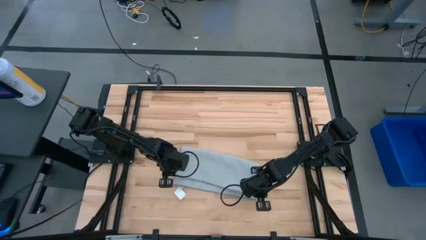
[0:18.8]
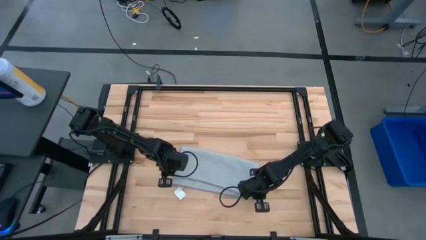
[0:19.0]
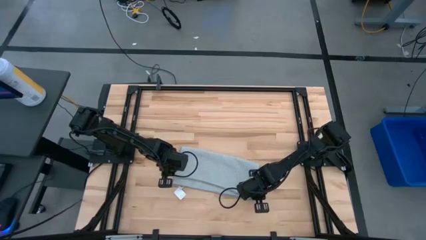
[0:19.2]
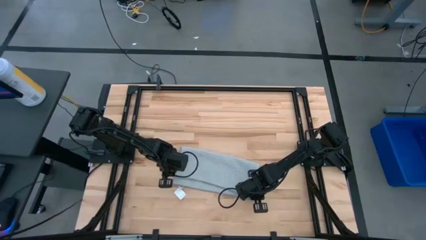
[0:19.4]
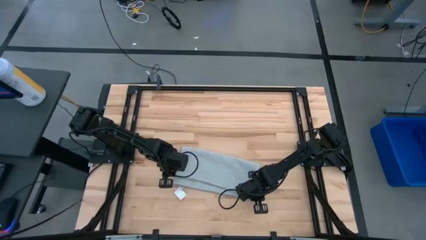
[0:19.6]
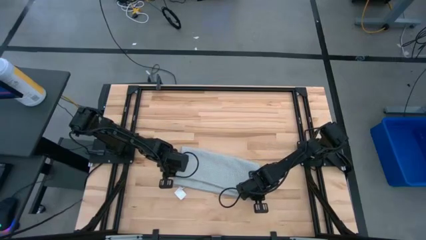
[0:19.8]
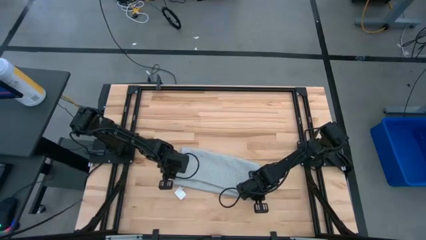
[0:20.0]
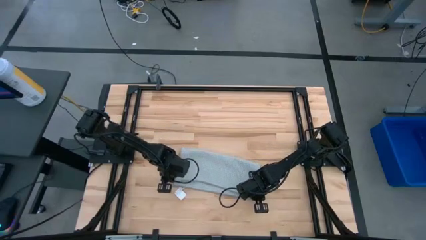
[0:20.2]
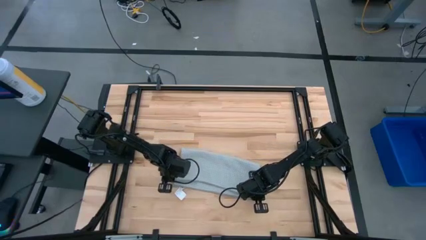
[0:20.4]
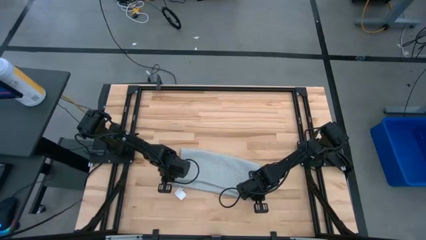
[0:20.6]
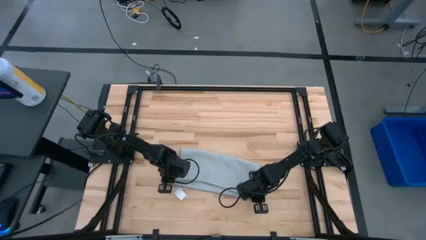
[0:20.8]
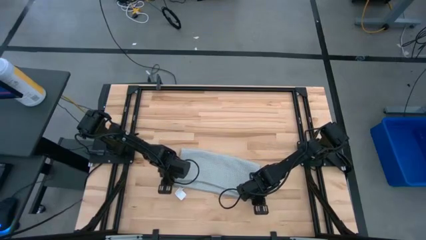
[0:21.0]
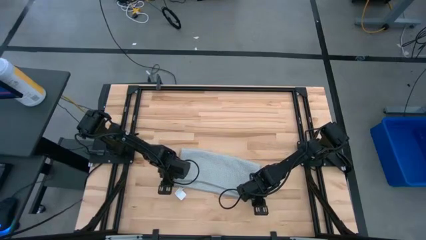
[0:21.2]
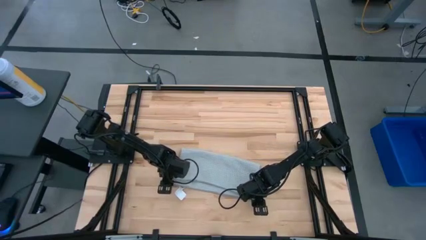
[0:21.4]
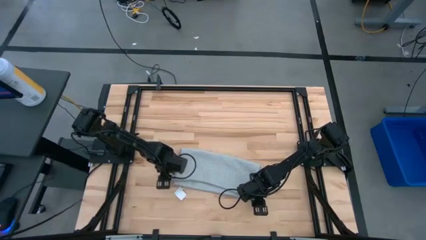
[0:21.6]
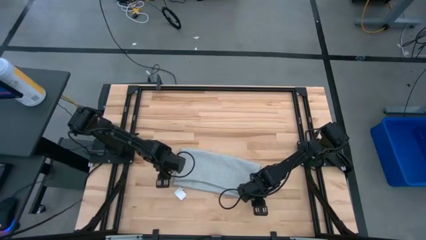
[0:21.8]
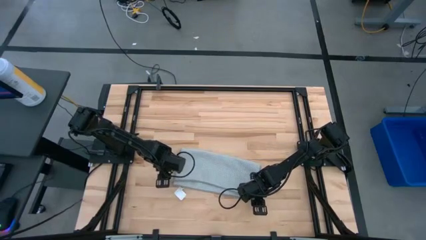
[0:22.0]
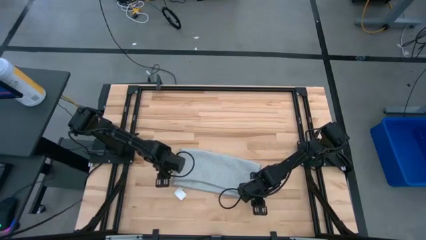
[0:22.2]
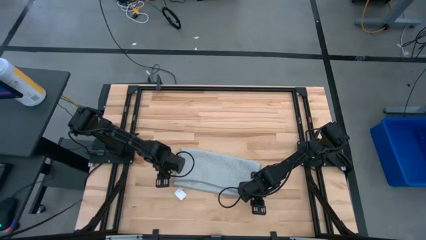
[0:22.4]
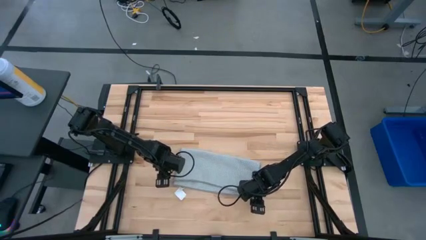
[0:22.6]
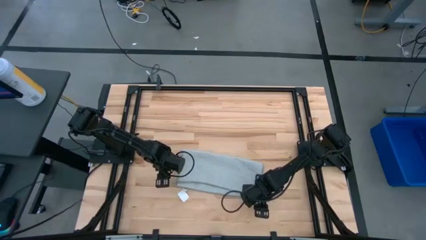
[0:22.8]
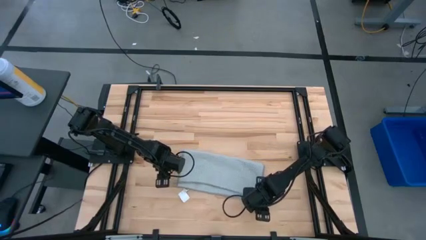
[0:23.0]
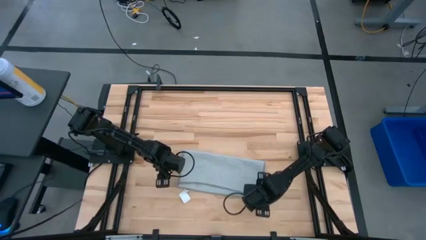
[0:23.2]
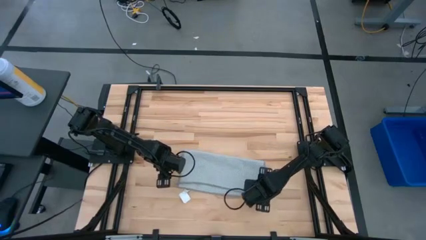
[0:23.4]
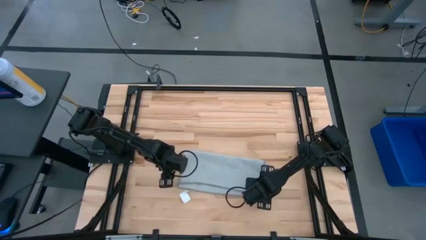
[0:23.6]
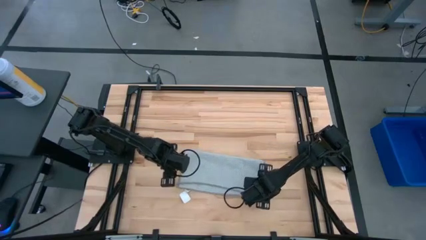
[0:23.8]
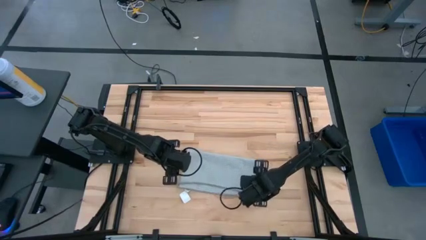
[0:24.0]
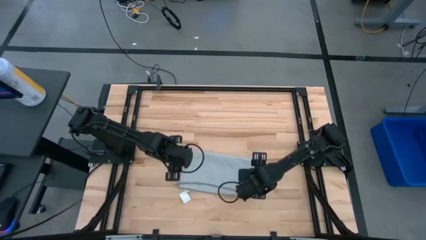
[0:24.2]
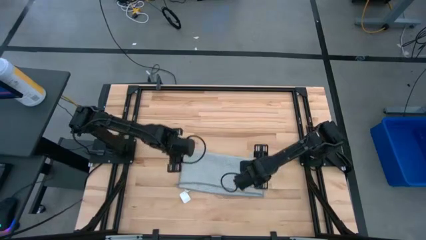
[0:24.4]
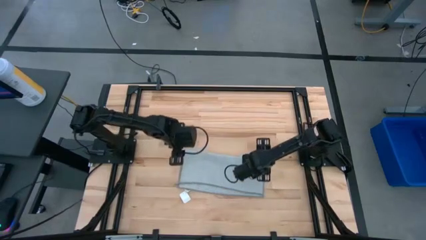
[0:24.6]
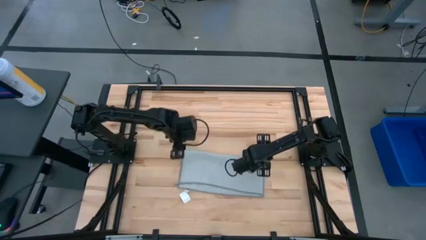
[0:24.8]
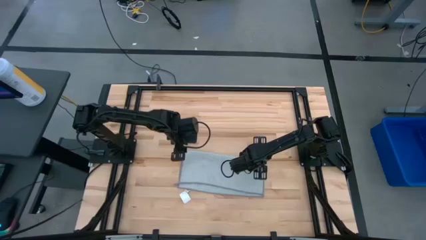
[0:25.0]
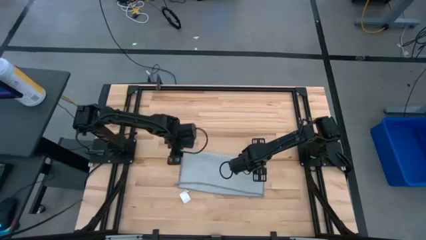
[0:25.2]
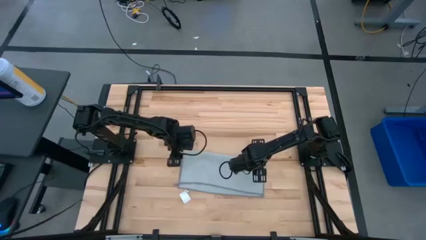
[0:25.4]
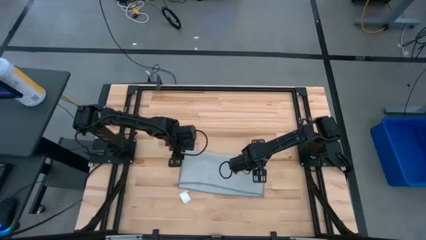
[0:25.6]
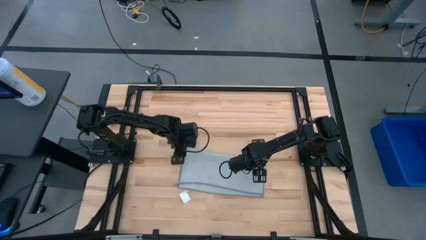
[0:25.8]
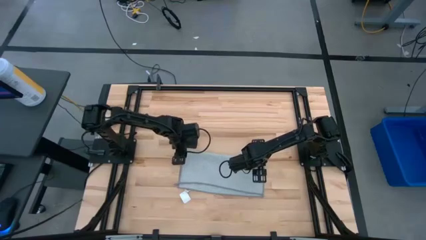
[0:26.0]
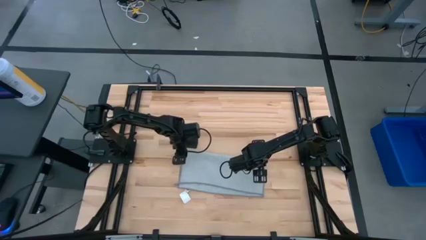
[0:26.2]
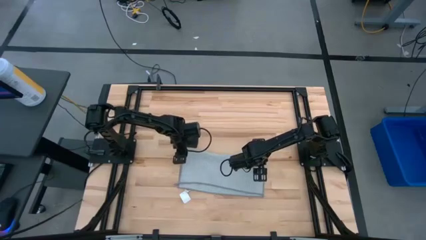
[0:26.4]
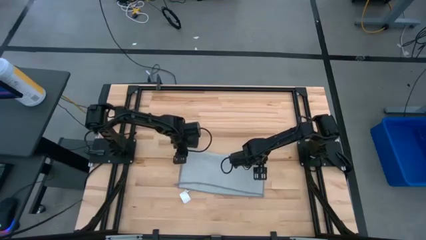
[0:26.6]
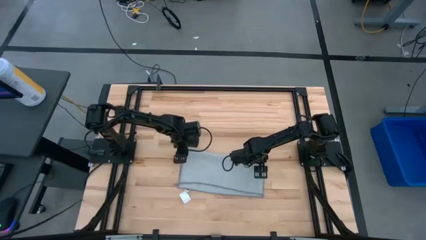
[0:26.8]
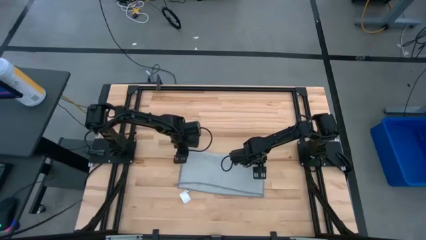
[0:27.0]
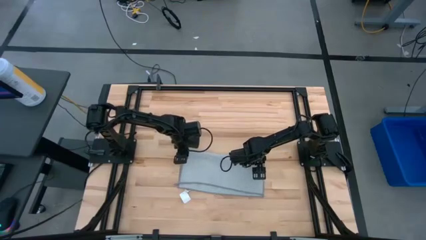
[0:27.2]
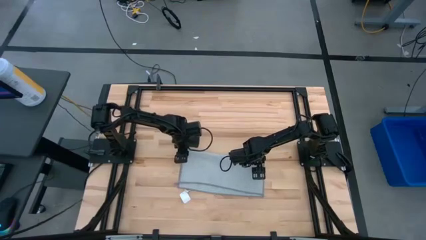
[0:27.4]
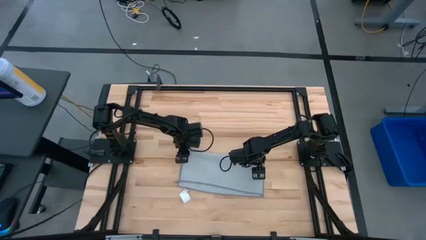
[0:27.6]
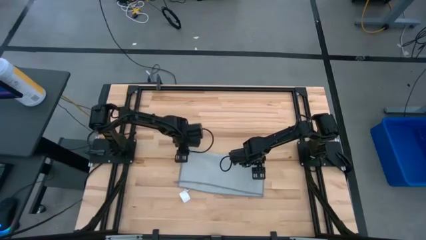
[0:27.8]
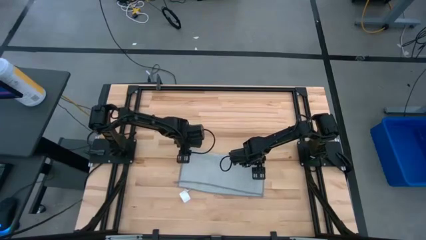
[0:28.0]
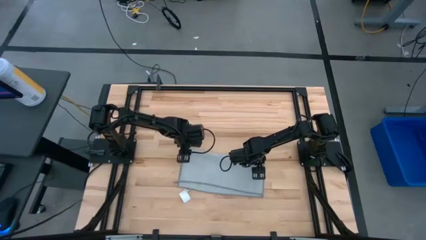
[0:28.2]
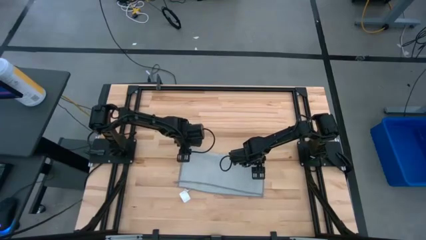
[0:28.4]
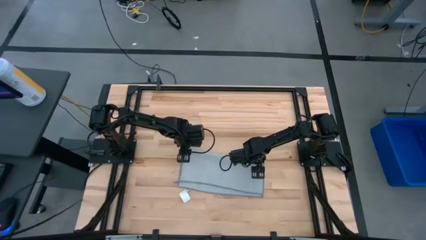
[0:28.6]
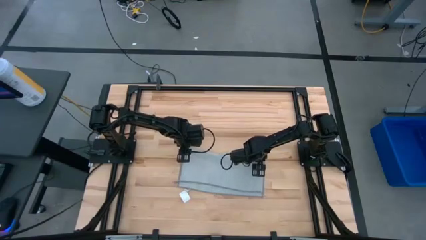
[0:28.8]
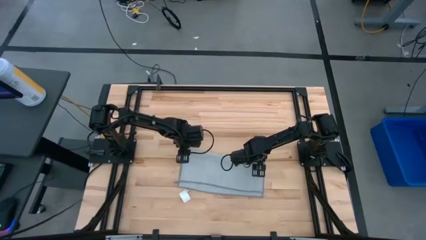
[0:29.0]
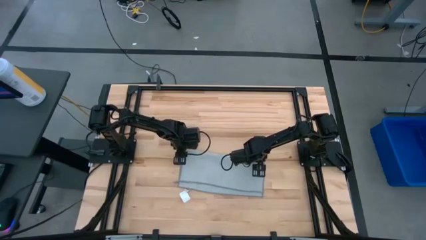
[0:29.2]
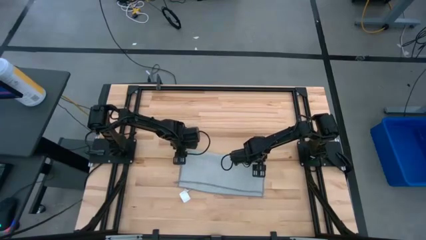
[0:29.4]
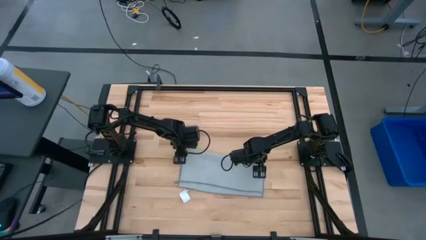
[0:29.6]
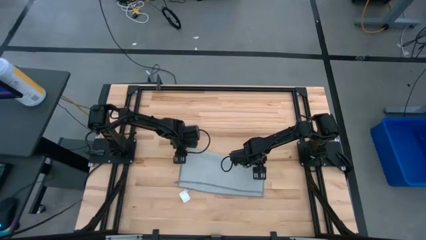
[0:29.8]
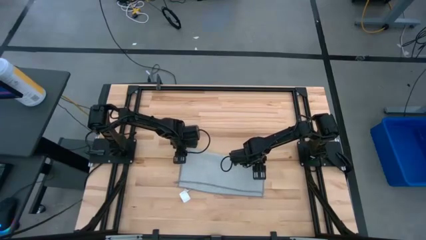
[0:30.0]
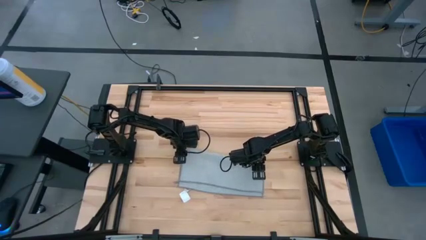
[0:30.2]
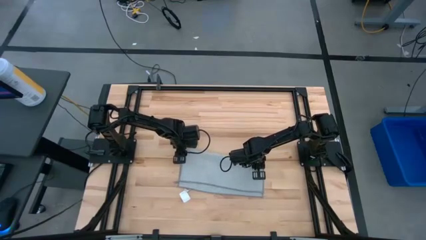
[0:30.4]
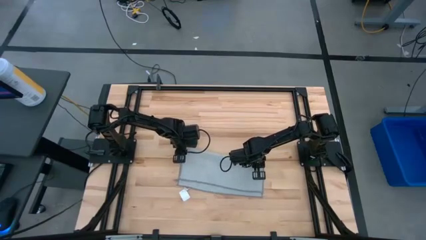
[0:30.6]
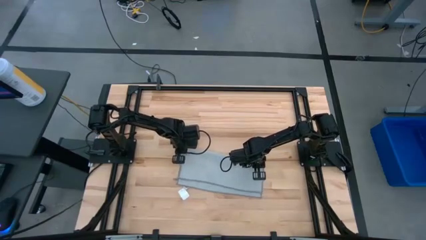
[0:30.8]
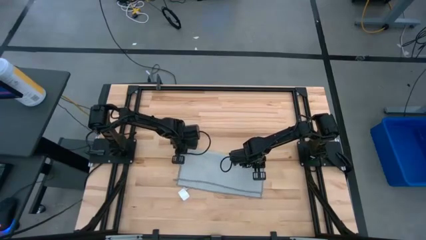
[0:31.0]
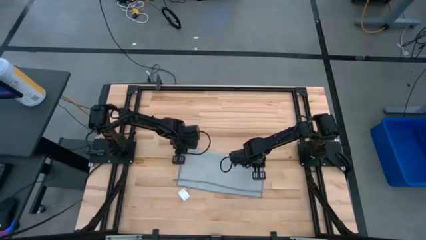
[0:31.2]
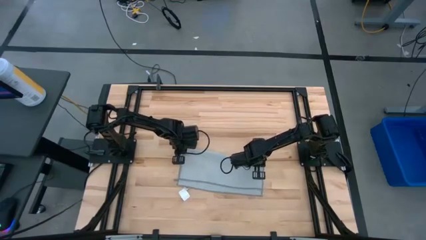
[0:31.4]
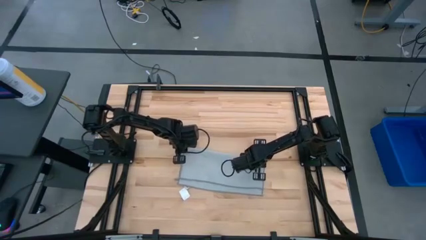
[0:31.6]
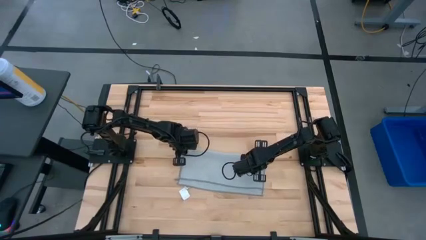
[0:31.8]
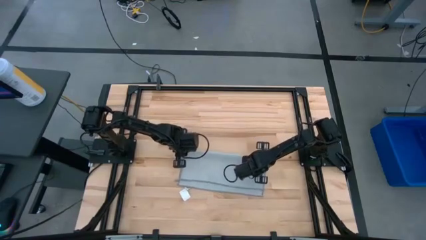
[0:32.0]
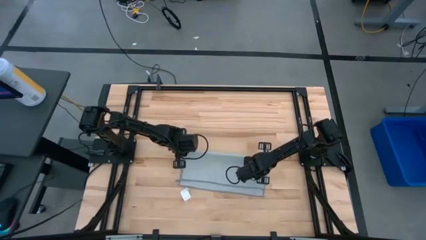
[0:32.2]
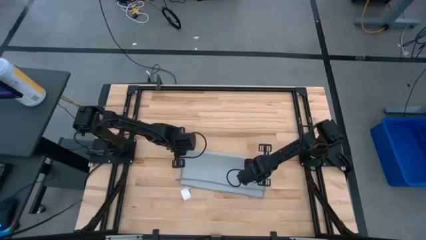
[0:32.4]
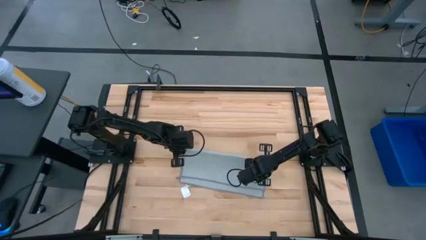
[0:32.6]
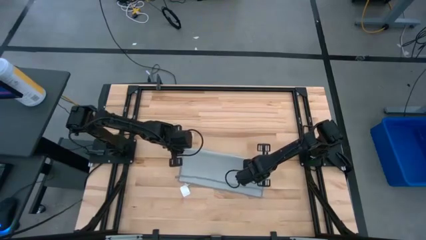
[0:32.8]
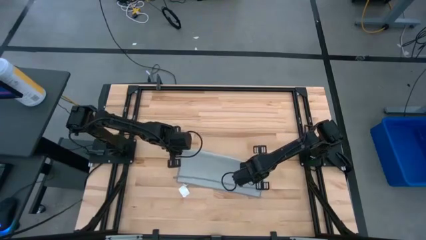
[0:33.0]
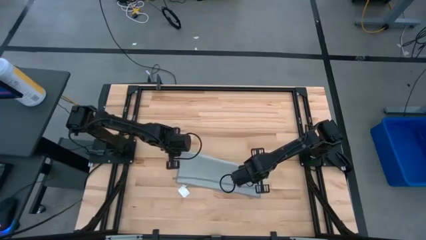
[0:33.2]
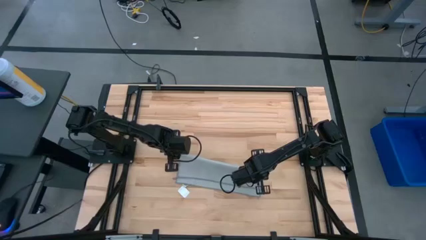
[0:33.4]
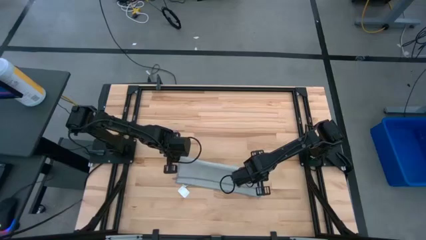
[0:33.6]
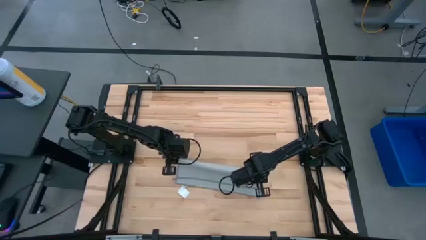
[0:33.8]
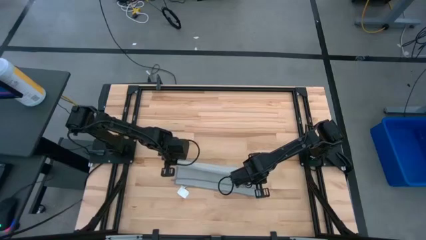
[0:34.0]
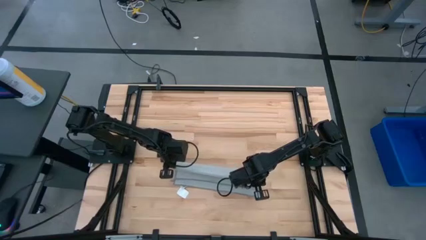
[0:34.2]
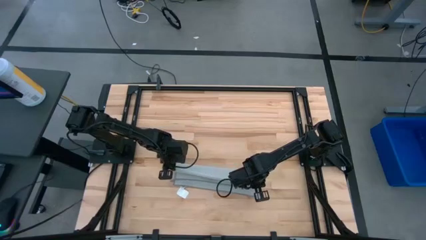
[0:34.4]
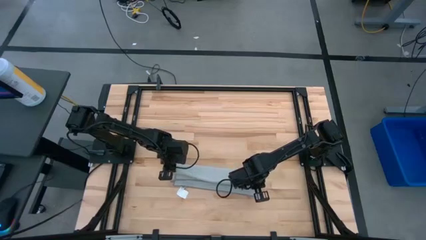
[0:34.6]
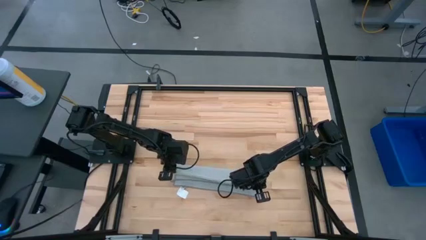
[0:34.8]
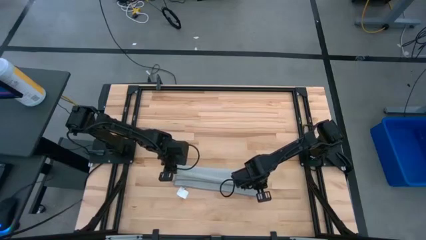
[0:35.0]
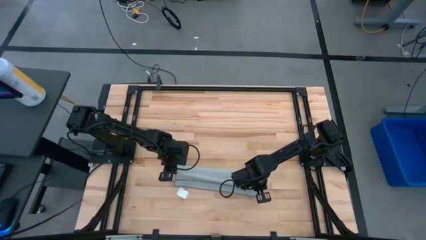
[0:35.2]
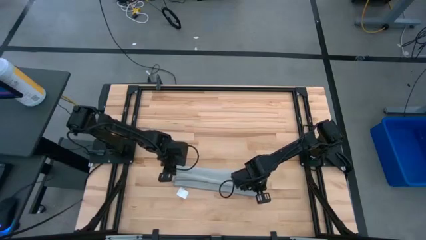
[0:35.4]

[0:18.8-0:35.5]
Task: Fold microfiber towels
Fold the gray towel
